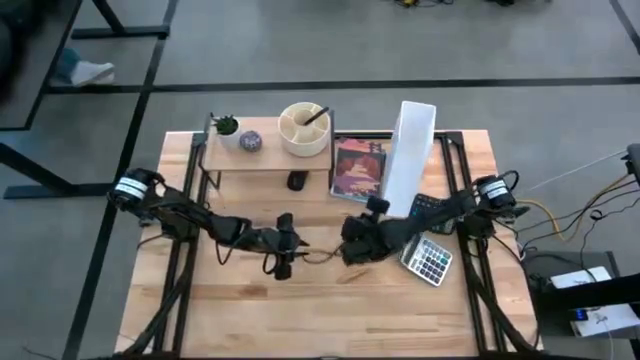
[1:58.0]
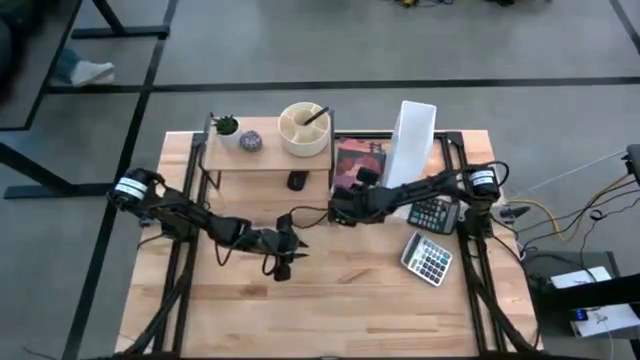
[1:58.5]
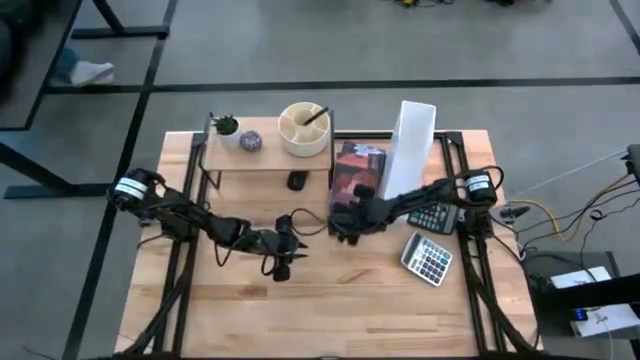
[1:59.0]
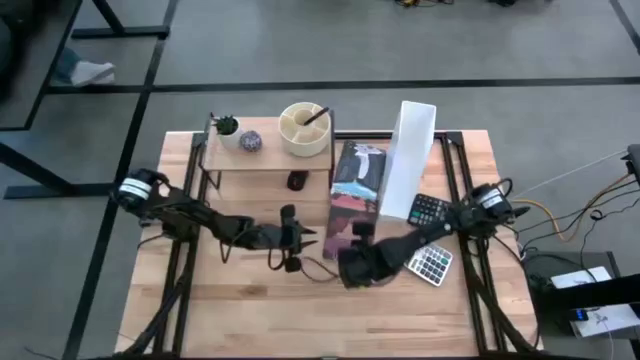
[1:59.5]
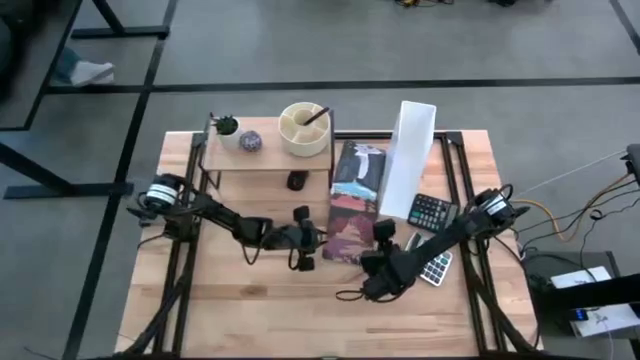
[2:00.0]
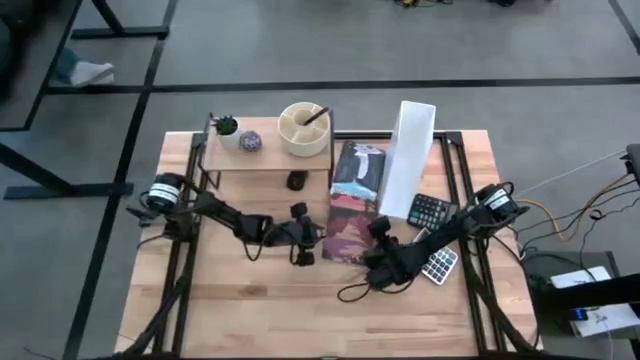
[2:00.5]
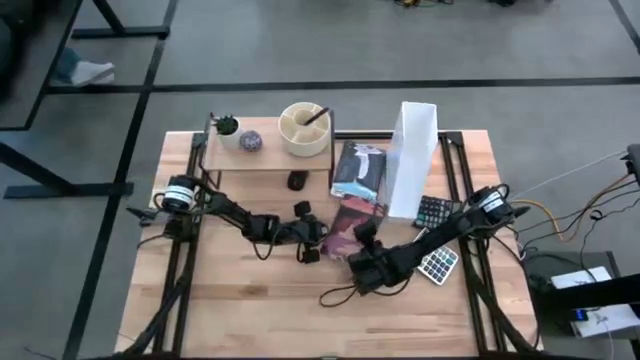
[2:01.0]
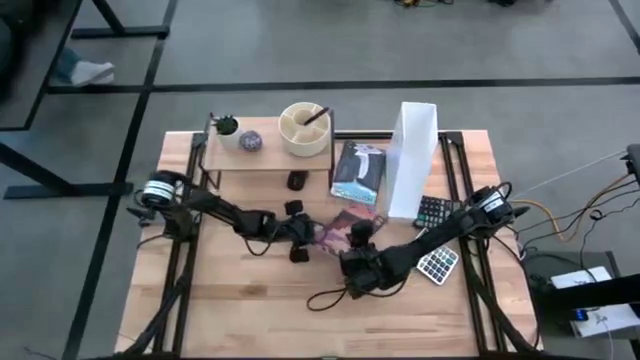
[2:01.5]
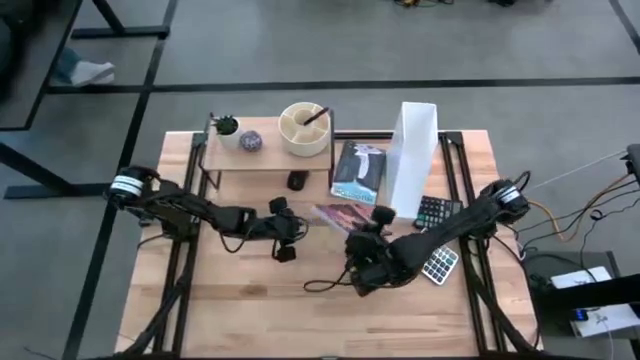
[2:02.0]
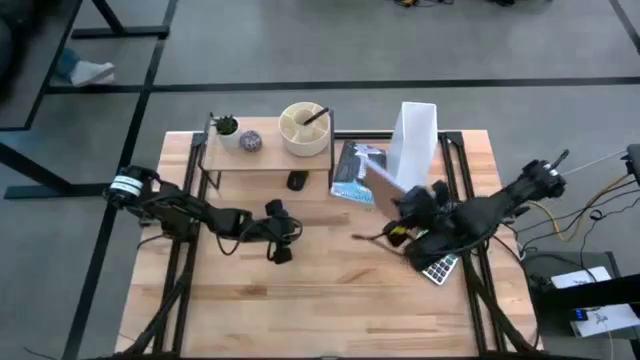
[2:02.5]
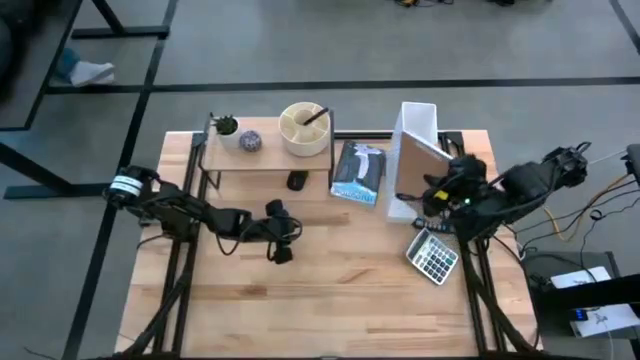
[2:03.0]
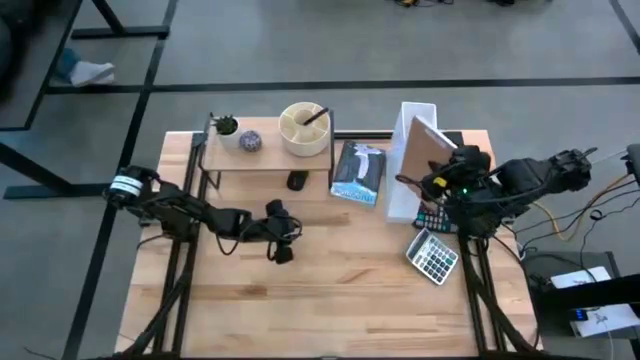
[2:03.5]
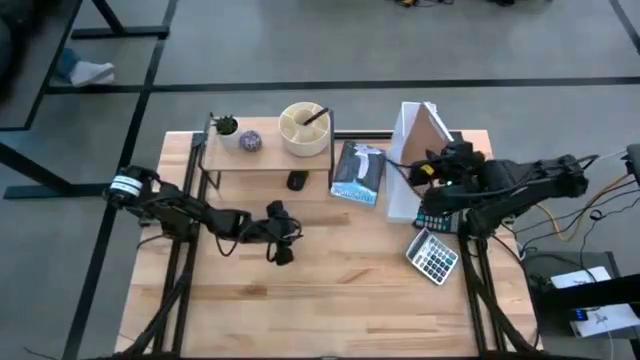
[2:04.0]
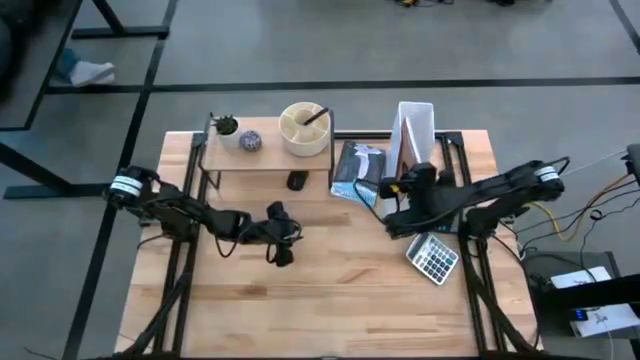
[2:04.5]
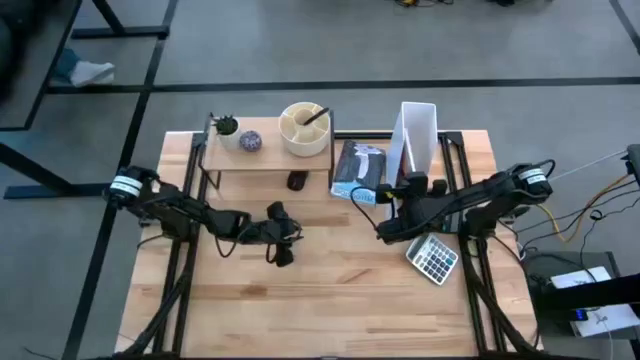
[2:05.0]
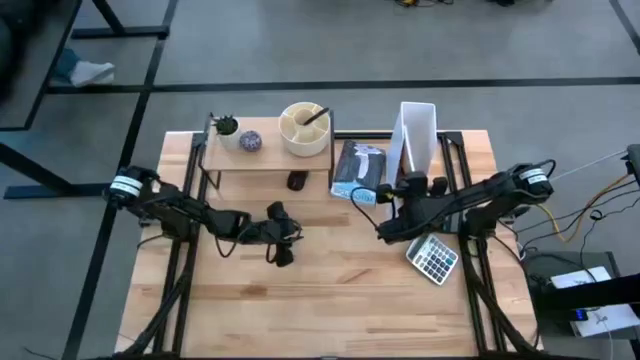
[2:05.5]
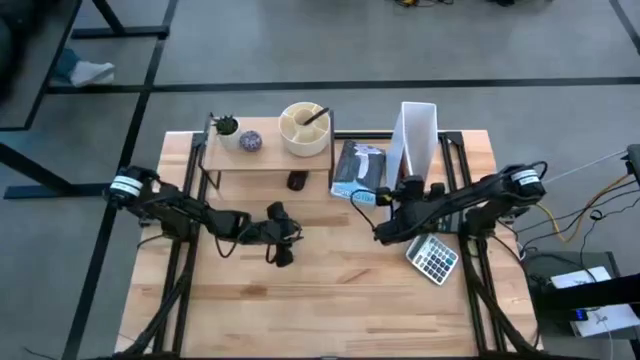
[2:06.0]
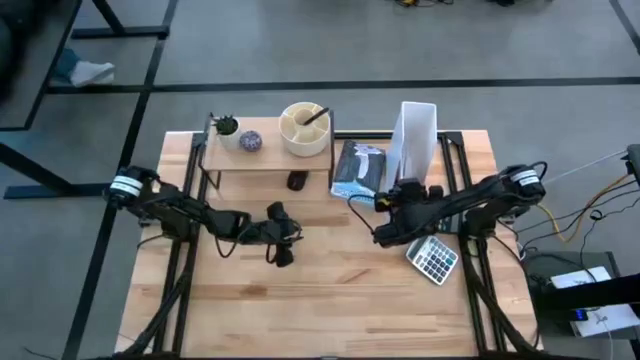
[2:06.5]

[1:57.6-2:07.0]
Task: Stock shelves
Put the brown book into the white file holder

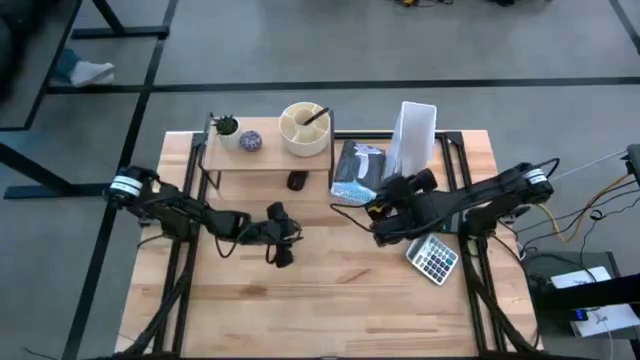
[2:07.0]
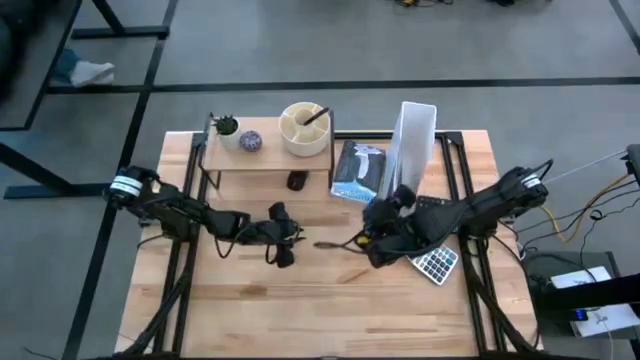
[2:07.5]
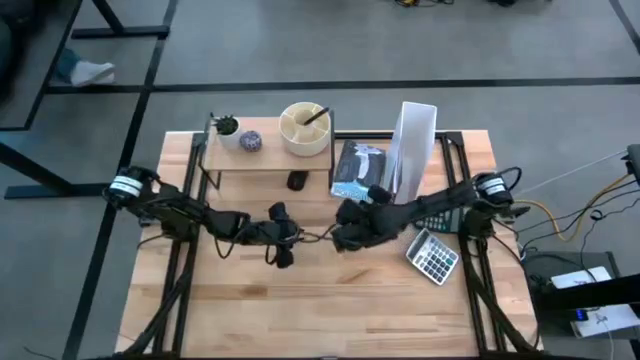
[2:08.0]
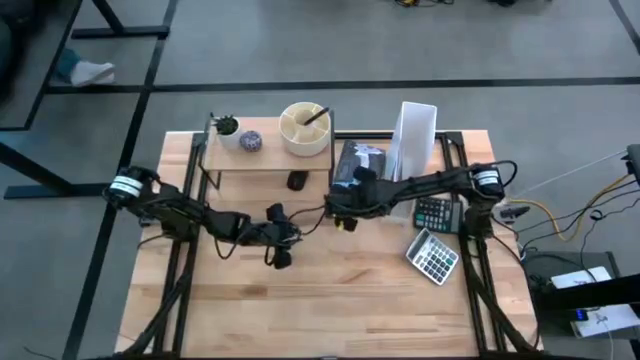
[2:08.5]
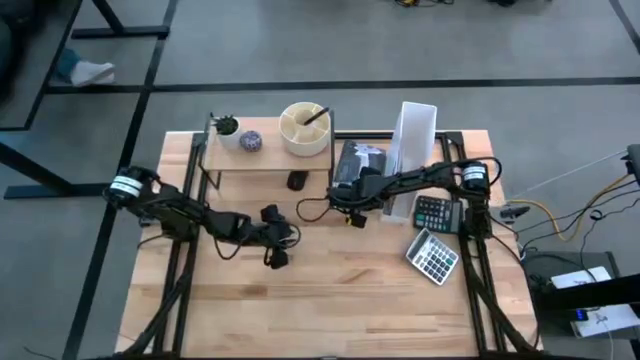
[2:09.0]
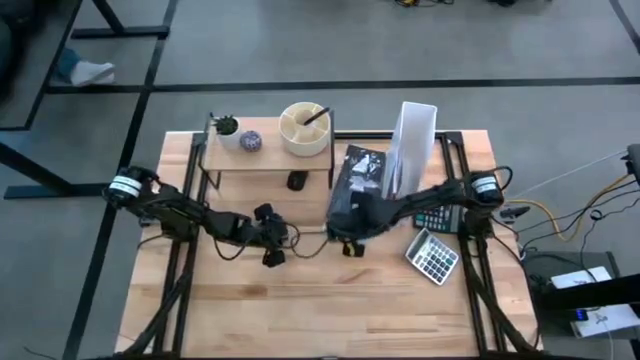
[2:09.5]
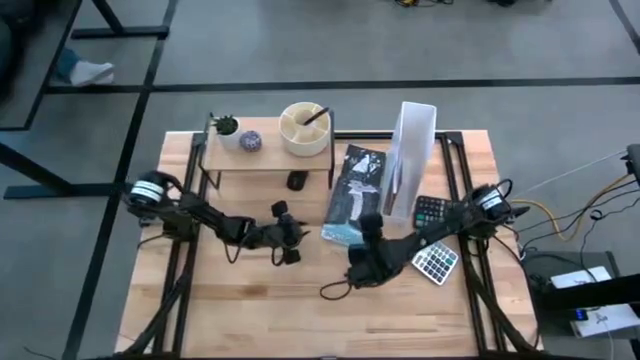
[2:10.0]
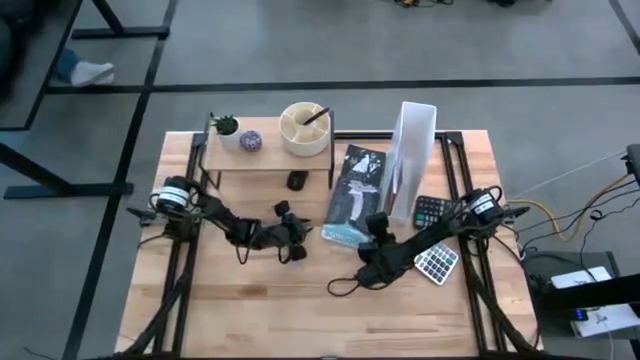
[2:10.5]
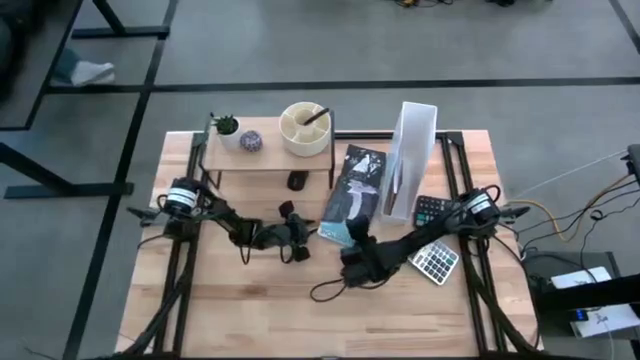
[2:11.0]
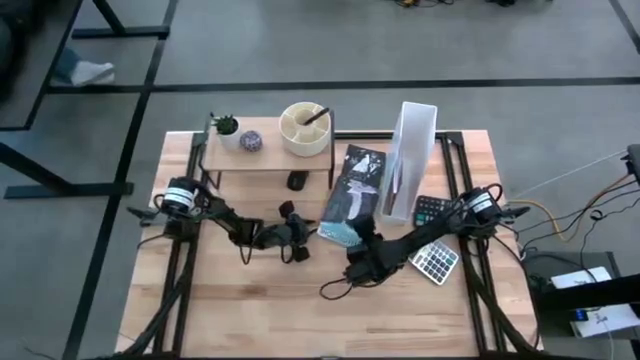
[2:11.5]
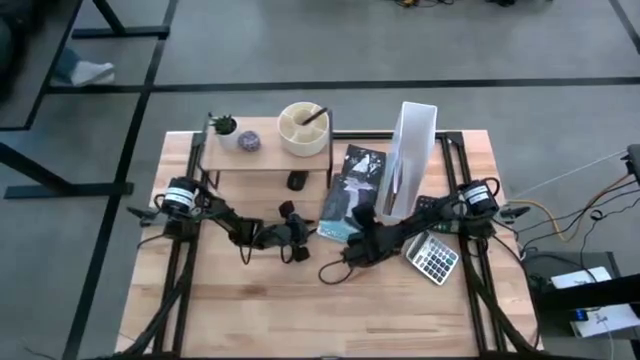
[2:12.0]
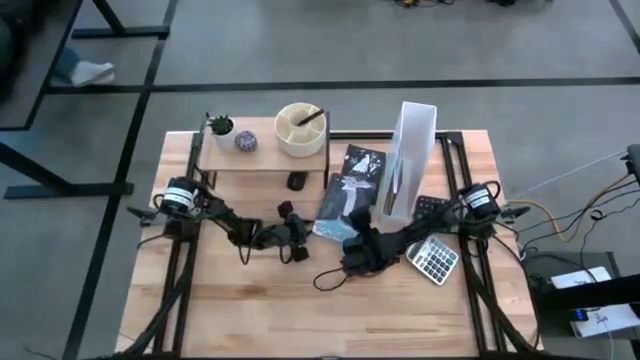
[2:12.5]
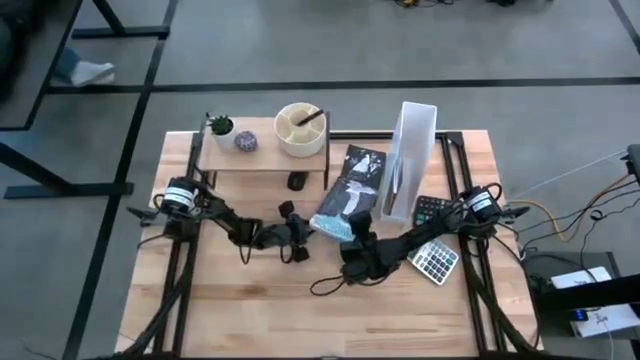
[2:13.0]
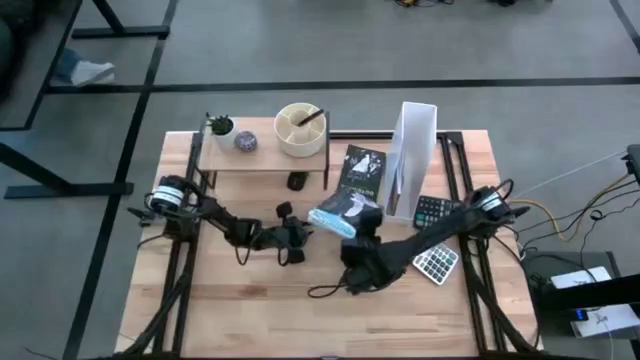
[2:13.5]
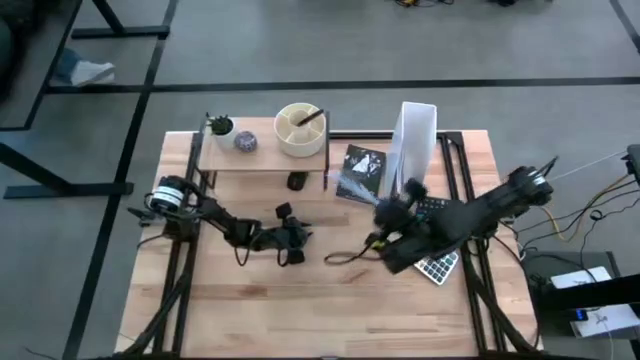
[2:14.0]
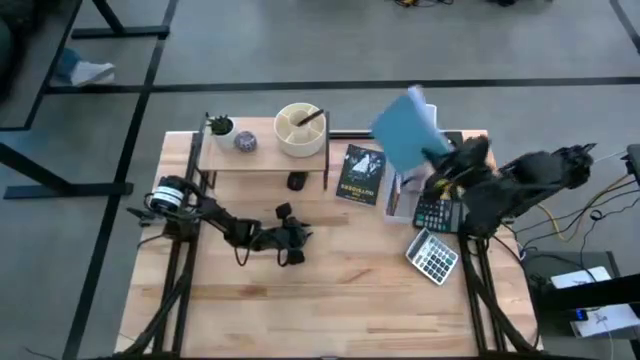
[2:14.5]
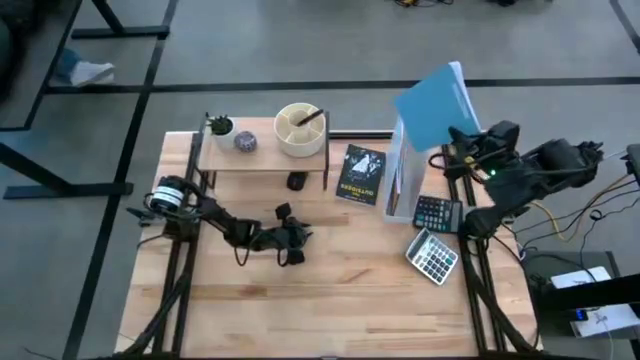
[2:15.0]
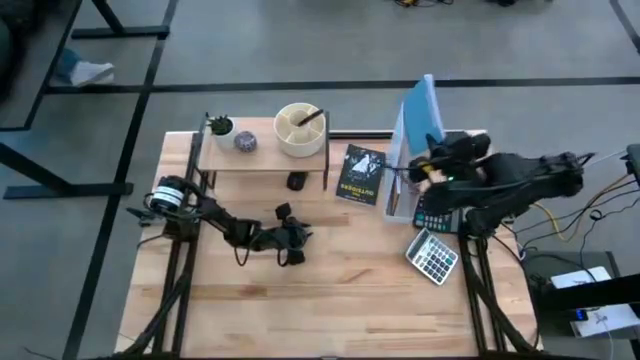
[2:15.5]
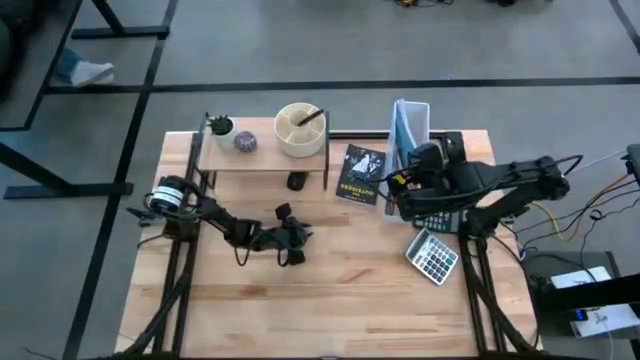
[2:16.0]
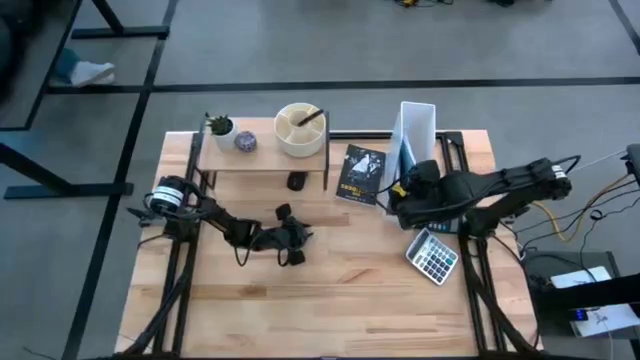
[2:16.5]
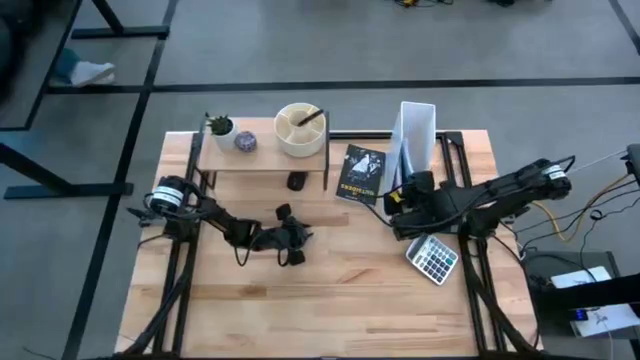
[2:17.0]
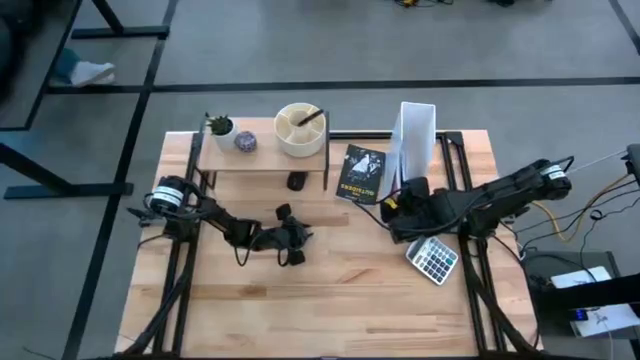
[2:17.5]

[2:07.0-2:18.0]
Put the blue book into the white file holder
